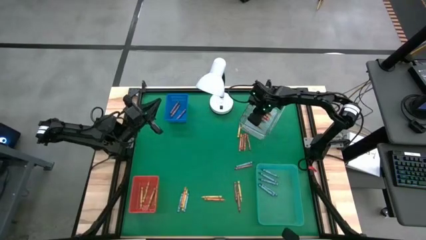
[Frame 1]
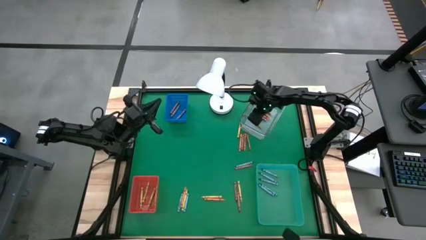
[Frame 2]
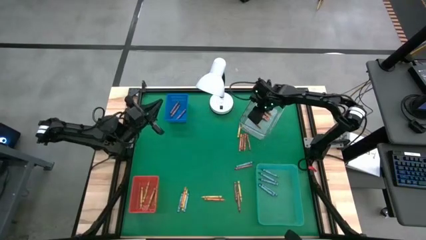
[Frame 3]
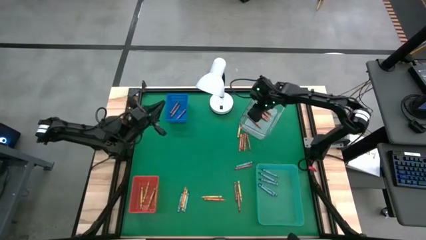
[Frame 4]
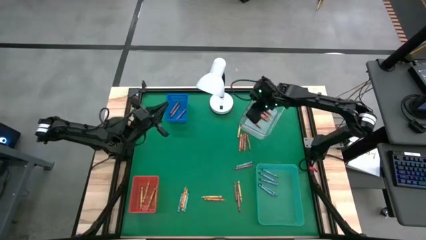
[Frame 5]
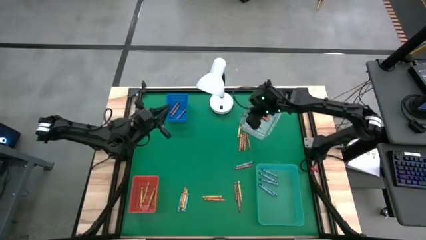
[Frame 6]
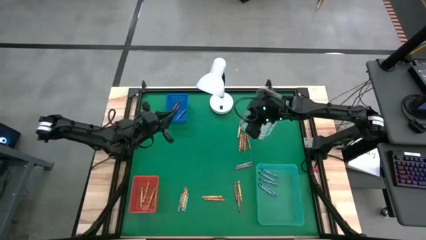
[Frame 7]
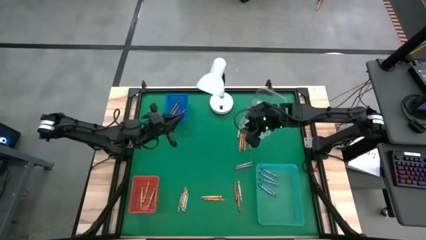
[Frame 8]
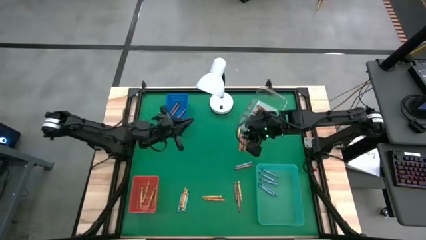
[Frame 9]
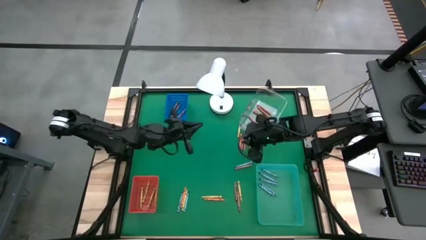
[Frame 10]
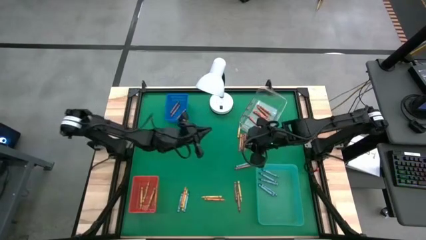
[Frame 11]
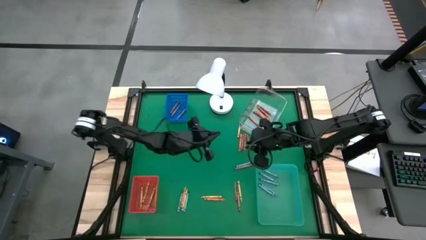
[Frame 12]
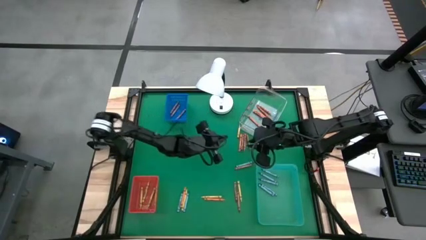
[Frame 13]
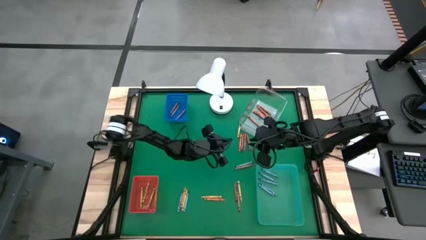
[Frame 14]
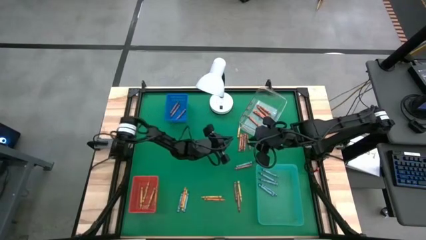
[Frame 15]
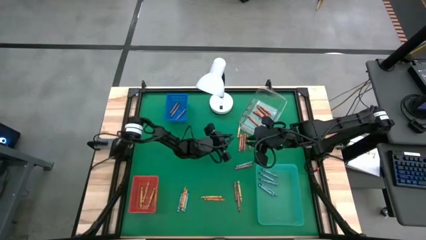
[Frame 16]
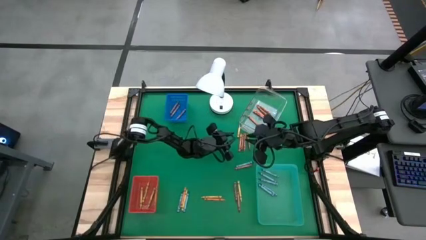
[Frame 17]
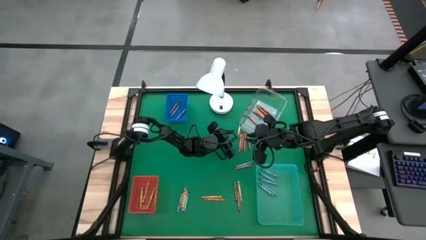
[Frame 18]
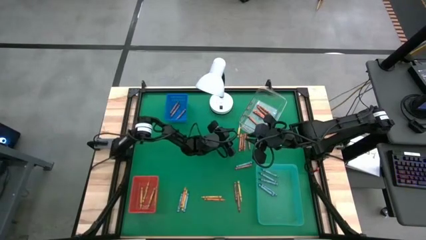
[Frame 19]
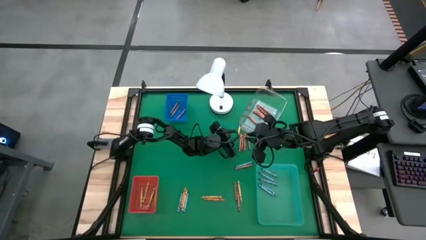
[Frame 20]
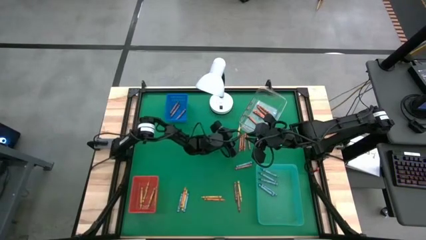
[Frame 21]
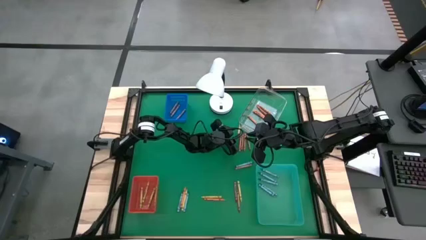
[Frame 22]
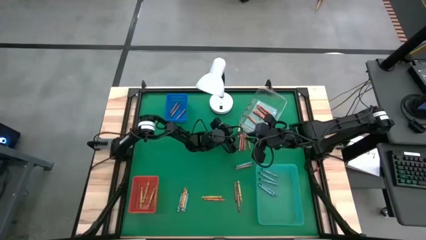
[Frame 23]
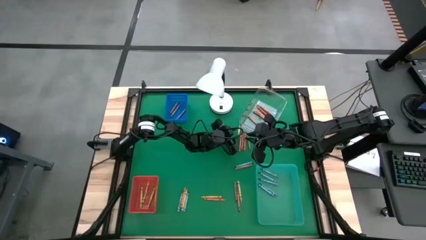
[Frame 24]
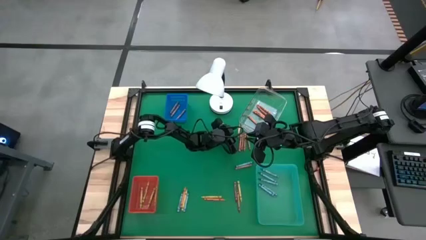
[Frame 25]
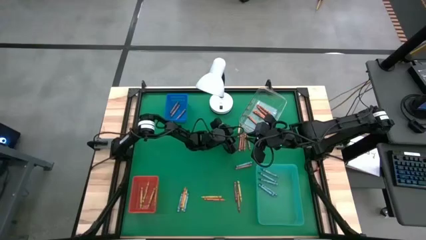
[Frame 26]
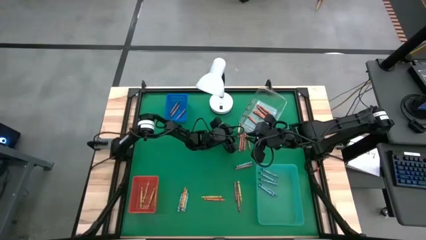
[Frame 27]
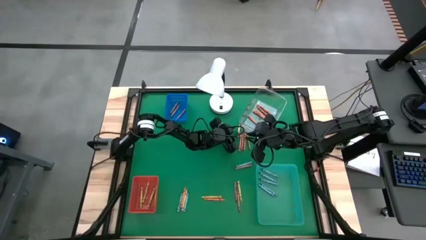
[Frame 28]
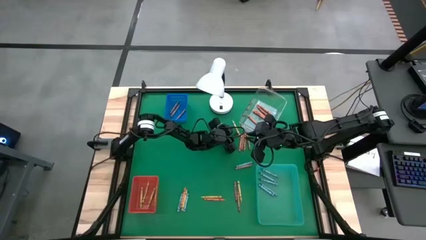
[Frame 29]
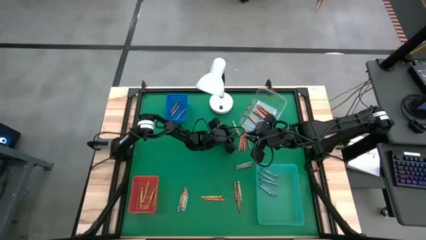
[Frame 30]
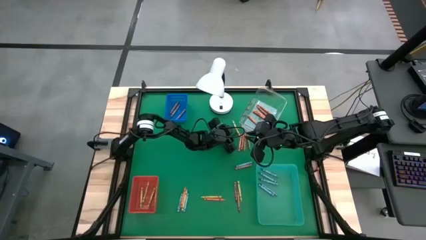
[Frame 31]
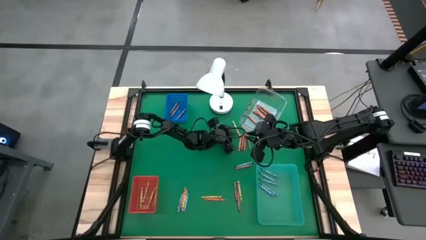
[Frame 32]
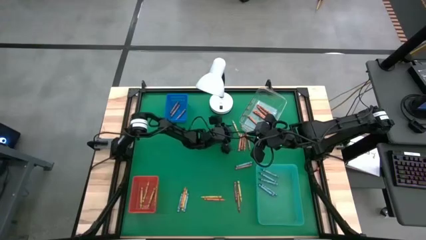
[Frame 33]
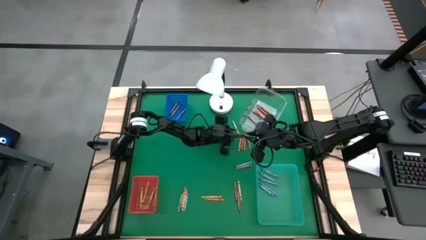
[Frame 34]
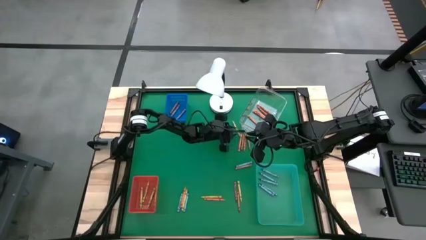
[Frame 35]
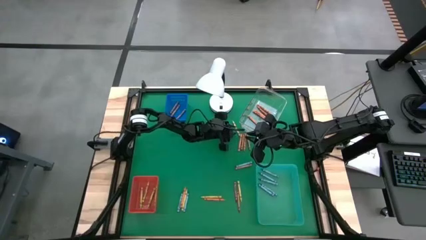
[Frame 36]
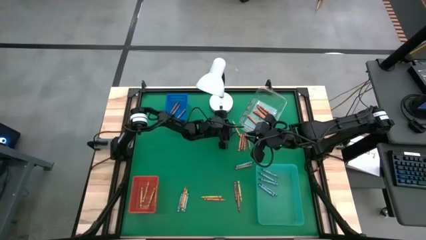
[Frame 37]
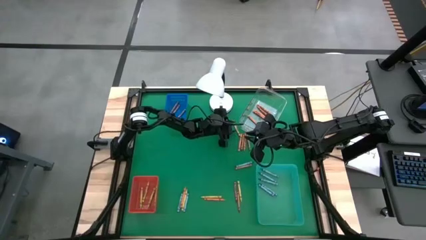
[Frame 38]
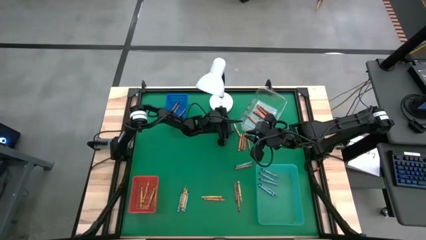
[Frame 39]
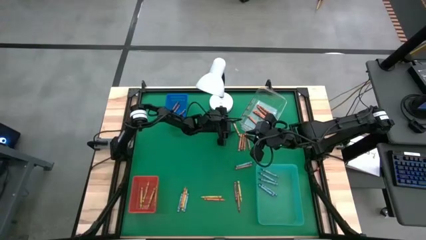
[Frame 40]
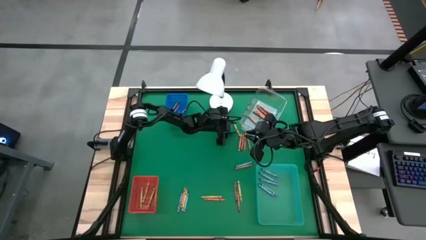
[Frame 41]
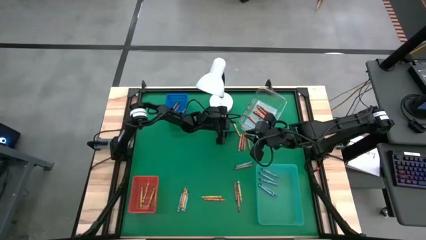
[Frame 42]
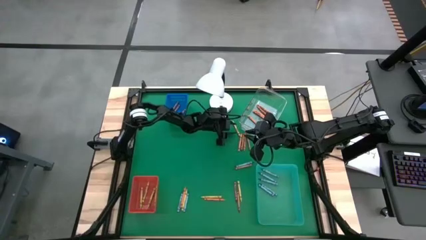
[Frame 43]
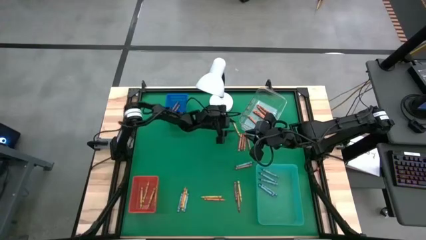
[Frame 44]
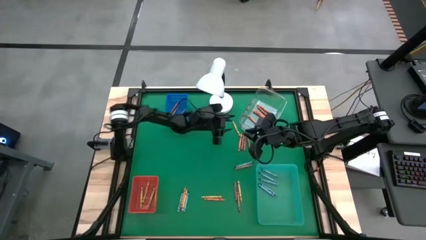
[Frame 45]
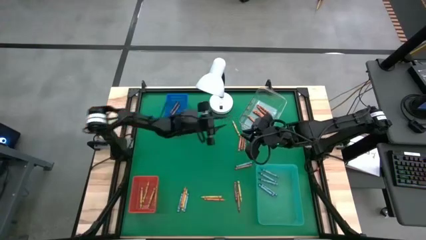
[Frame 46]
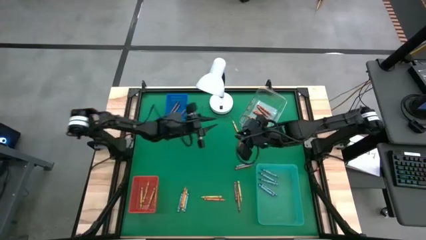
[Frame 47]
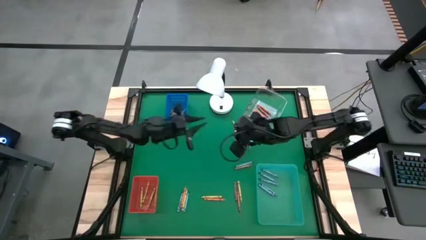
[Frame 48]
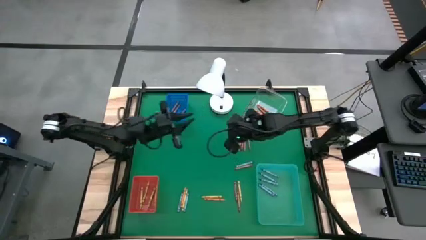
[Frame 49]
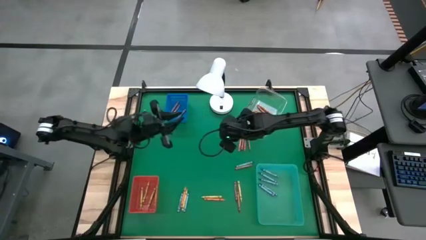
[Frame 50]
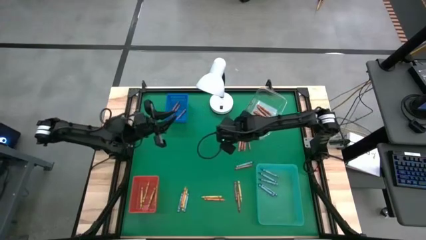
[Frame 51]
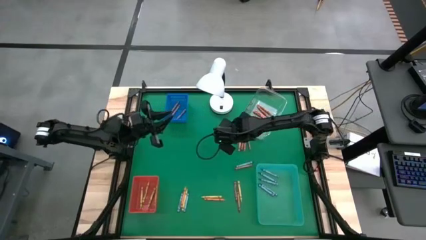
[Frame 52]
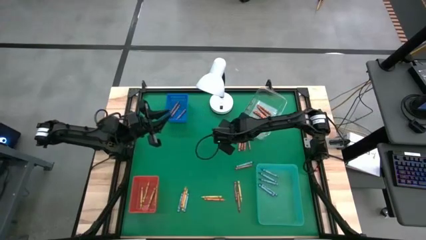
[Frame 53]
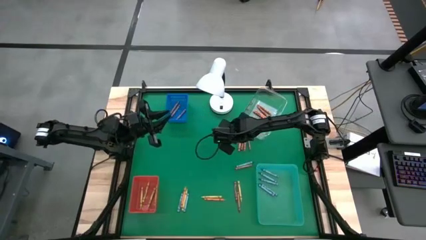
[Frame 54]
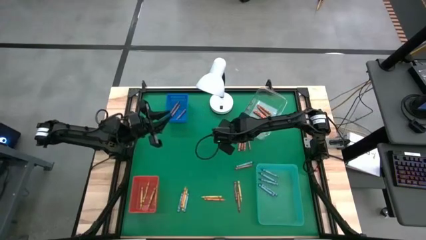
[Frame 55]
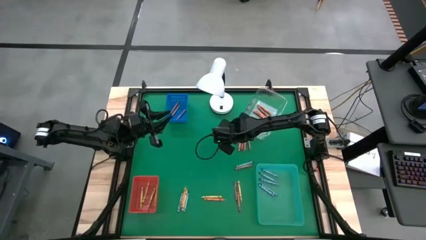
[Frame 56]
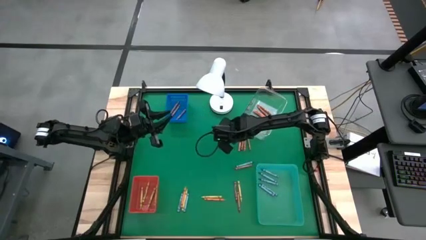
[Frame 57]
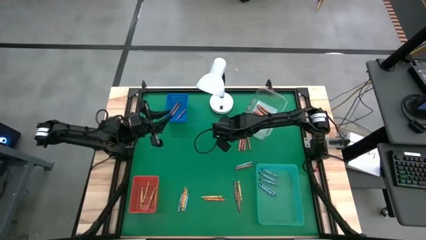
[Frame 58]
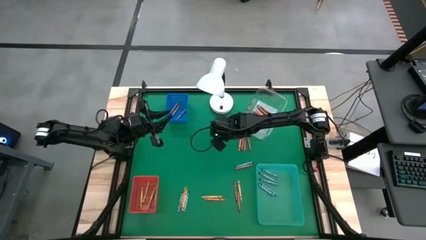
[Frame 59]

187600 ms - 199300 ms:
Task: Sort crayons
Put the yellow crayon into the red bin
